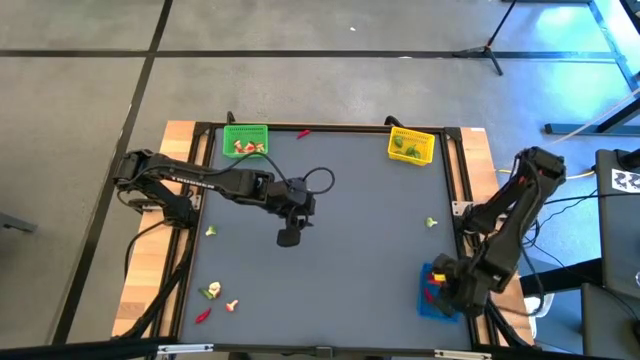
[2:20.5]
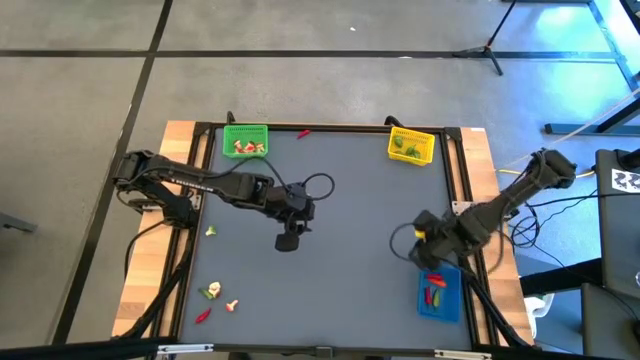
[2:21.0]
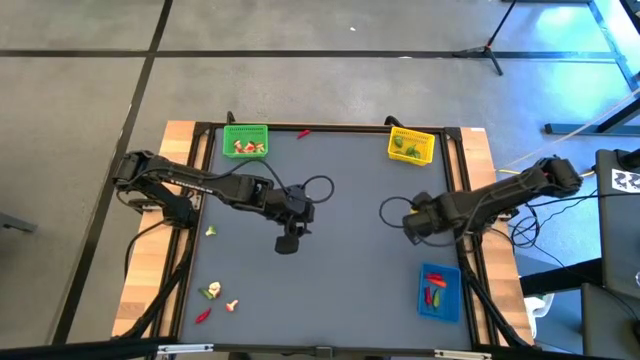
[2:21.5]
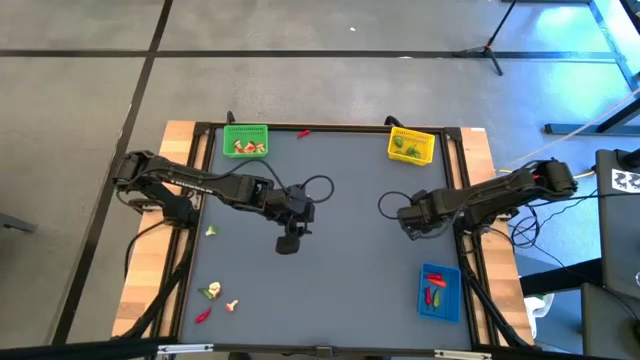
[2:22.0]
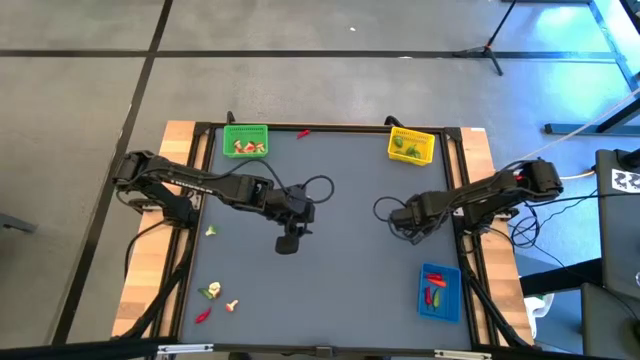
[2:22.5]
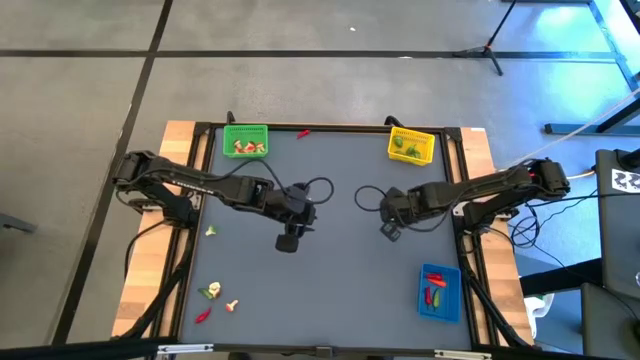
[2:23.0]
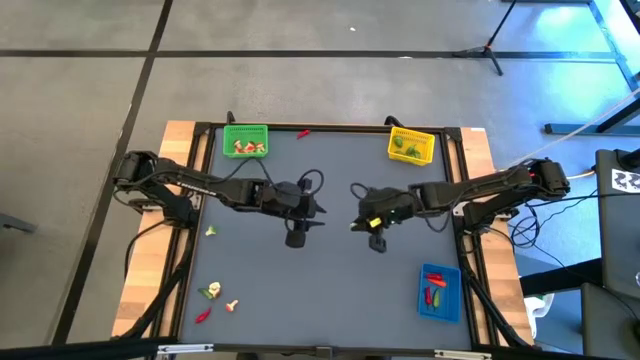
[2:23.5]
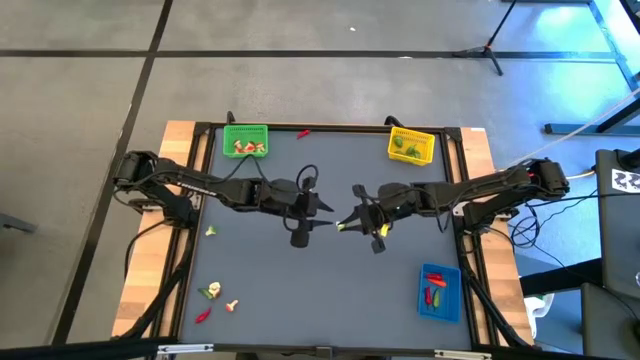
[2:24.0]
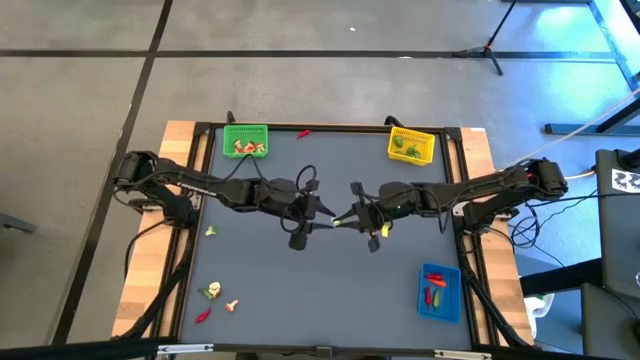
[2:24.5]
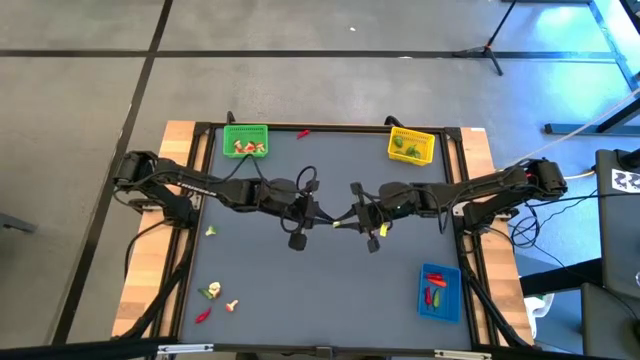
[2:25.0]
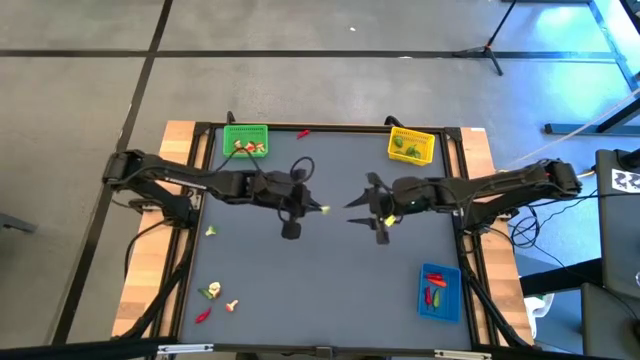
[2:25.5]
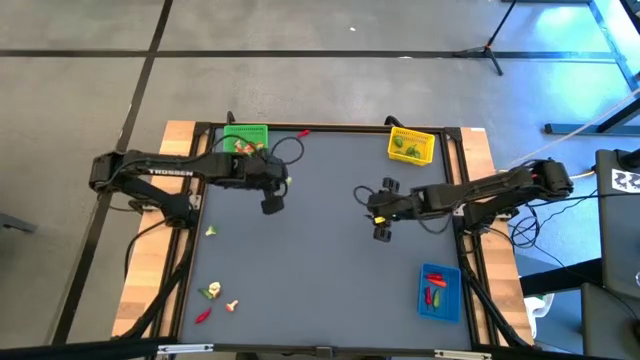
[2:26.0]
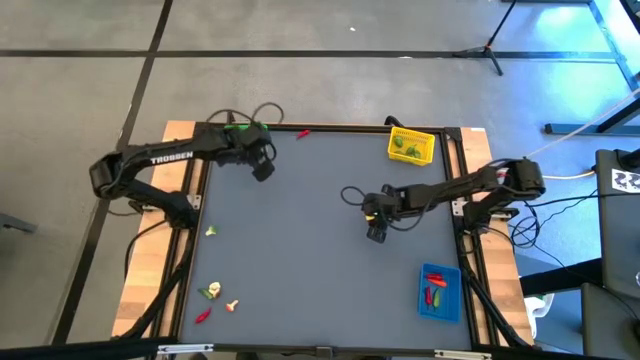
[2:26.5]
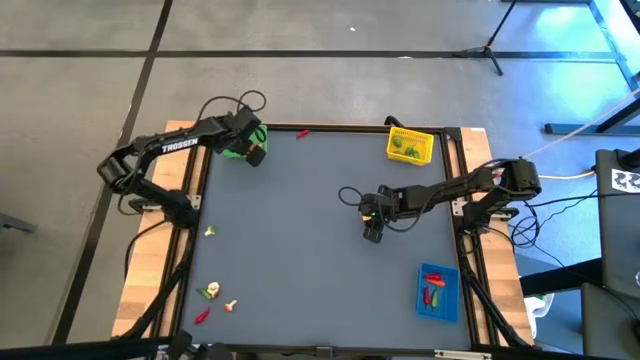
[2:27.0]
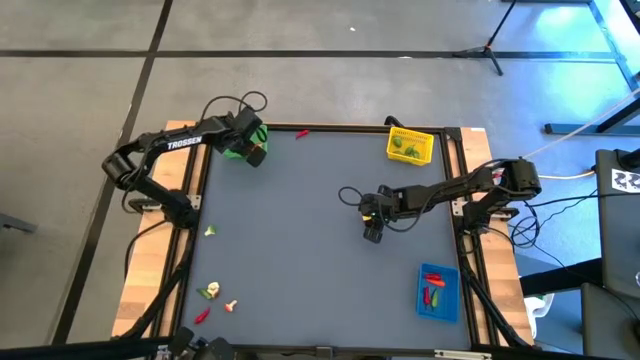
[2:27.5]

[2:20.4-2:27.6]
Task: Sort produce into baskets
Put the green mushroom into the green bin

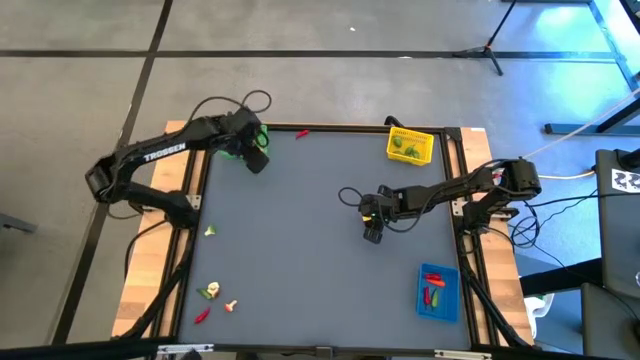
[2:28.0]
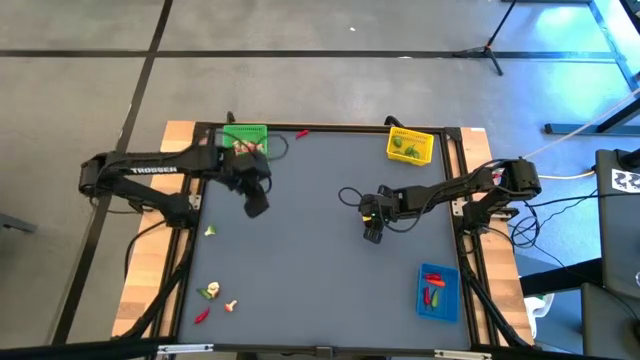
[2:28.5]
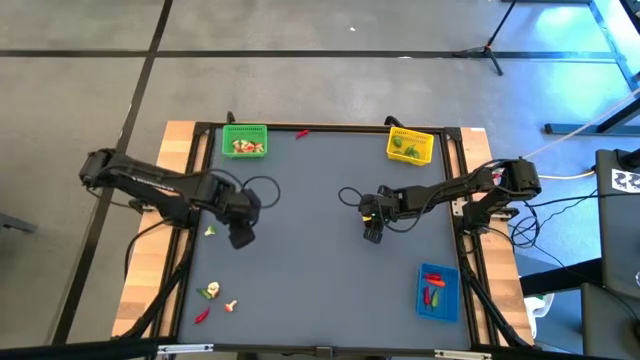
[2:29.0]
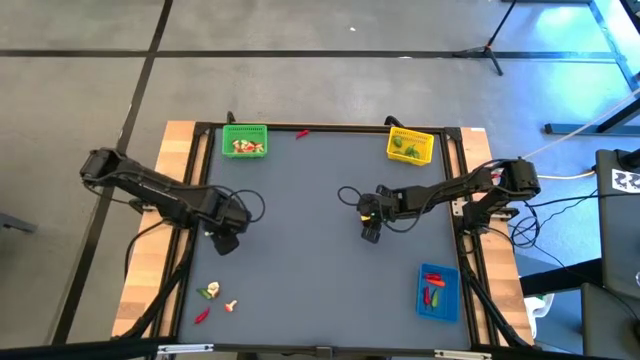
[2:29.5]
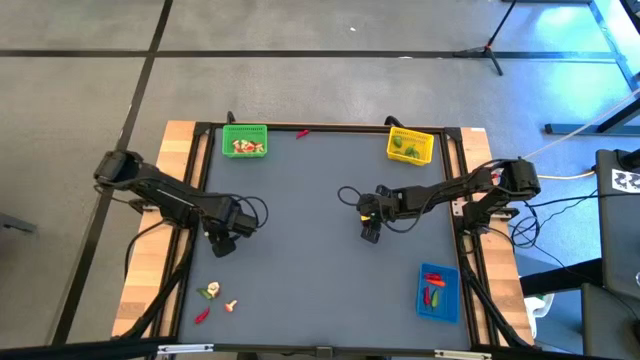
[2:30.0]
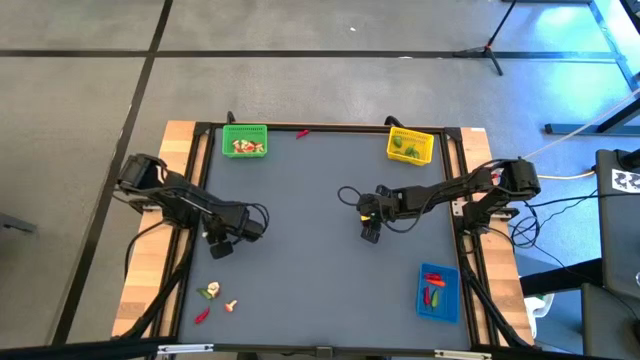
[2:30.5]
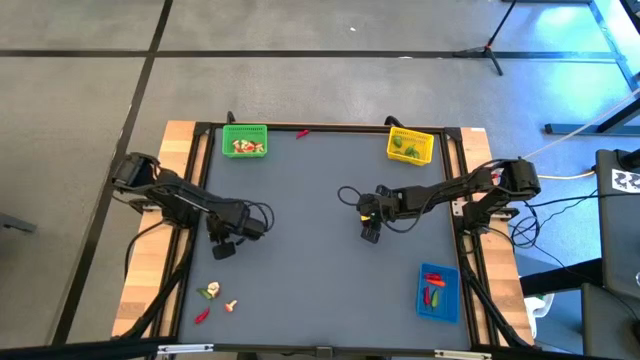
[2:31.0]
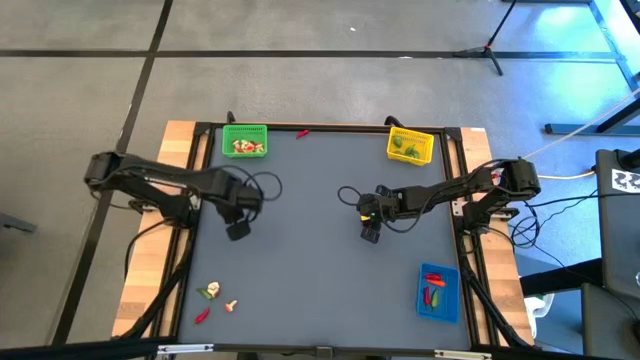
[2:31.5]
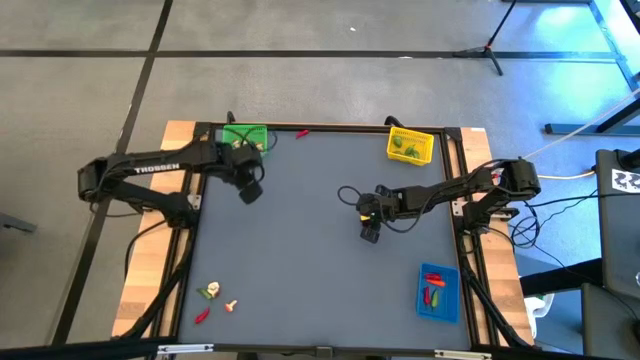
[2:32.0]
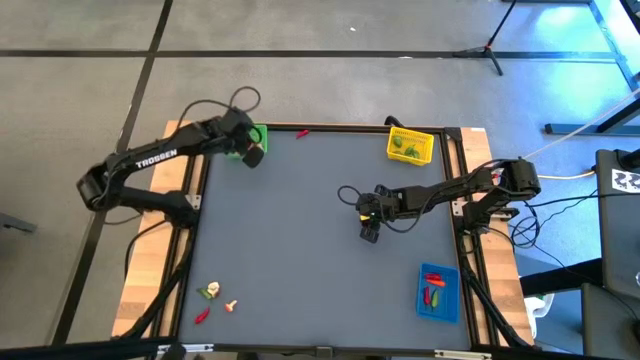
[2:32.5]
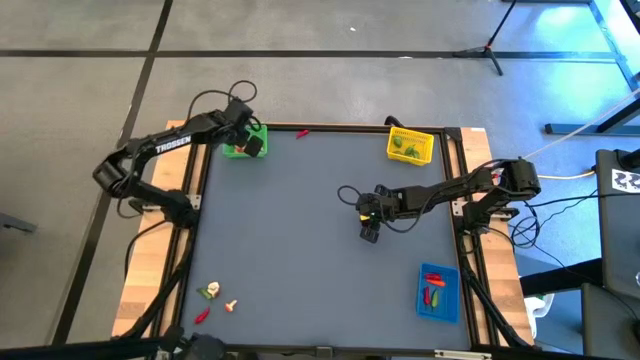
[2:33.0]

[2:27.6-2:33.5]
Put the green mushroom into the green bin

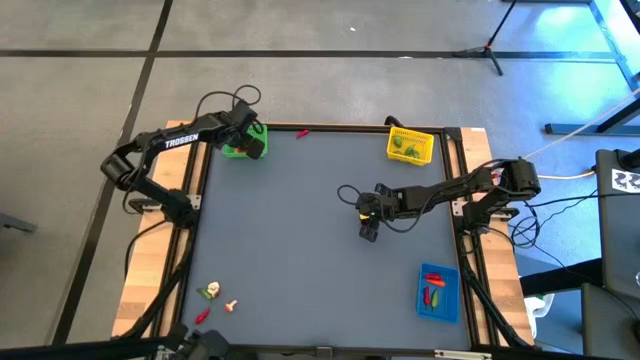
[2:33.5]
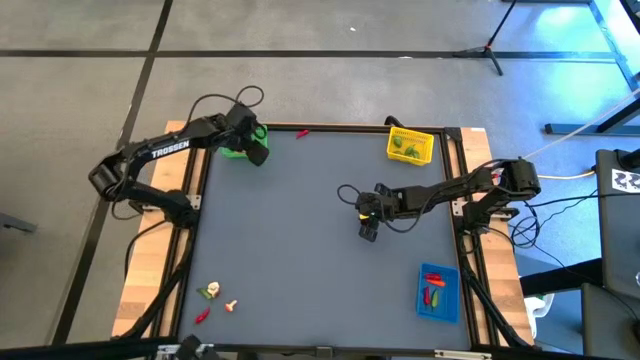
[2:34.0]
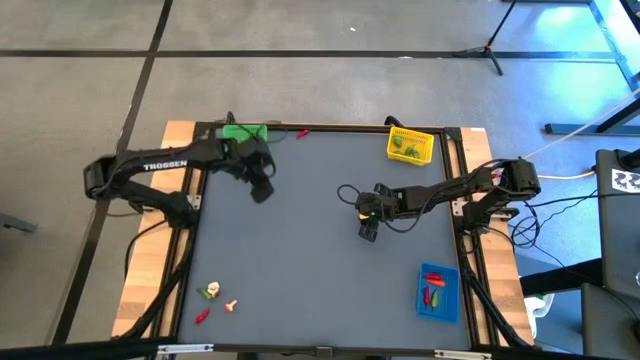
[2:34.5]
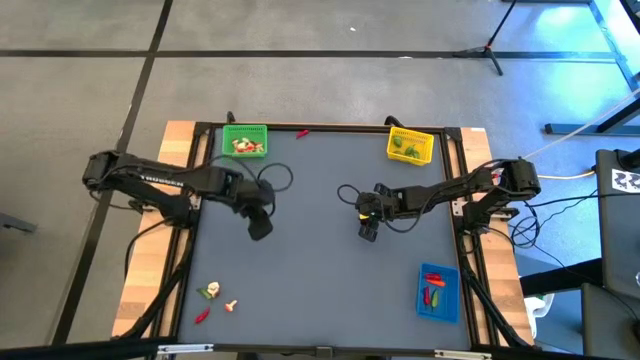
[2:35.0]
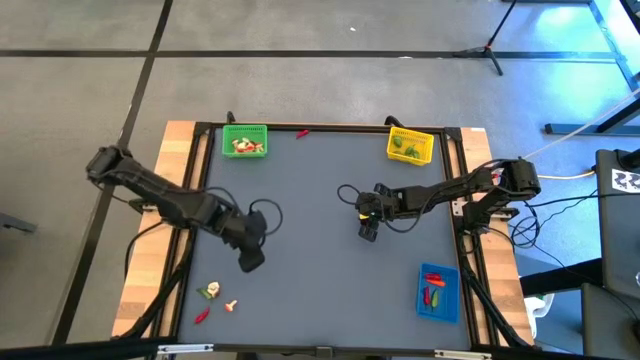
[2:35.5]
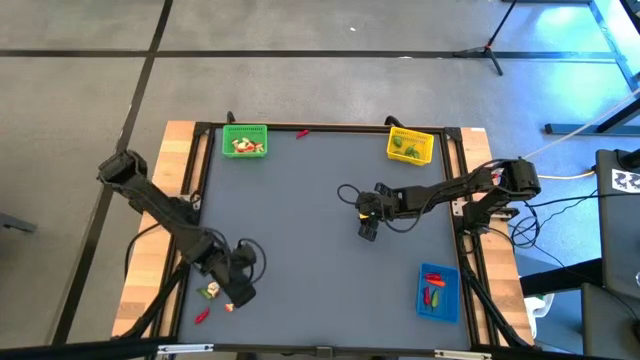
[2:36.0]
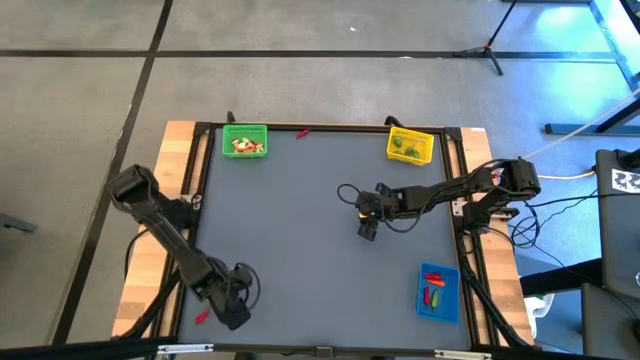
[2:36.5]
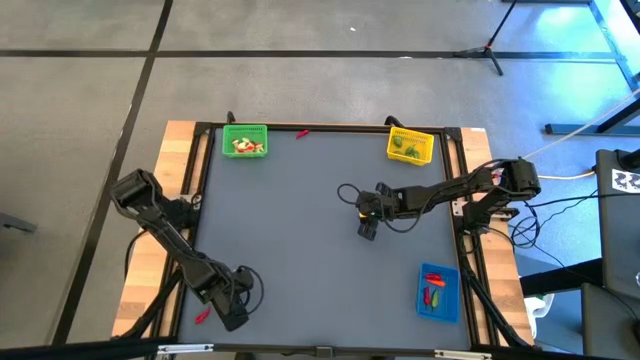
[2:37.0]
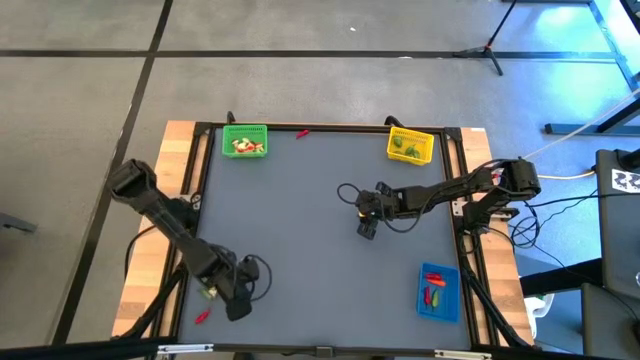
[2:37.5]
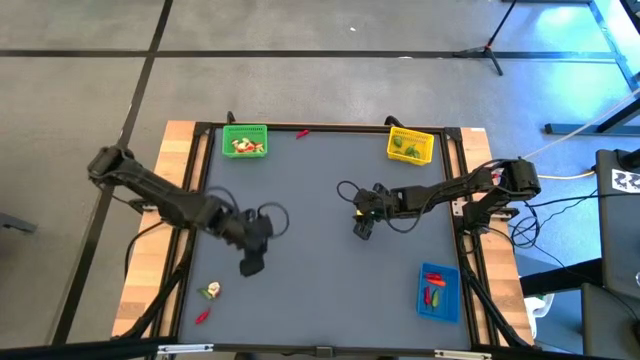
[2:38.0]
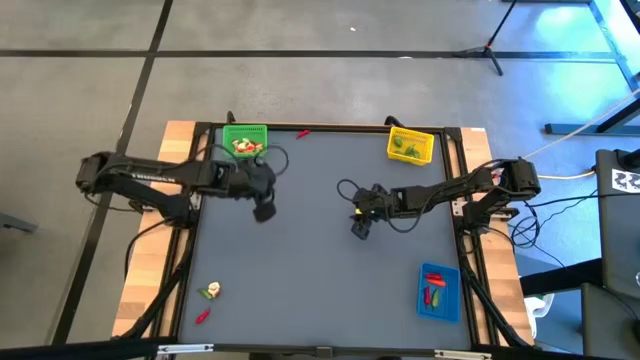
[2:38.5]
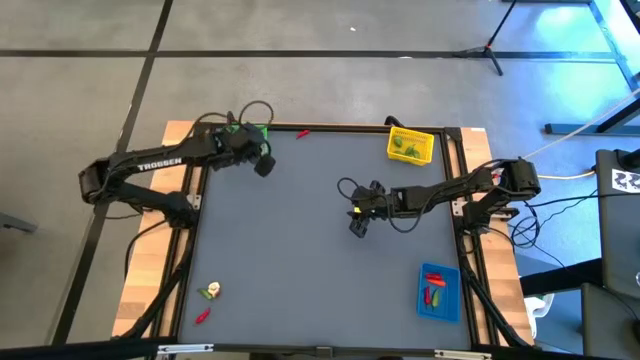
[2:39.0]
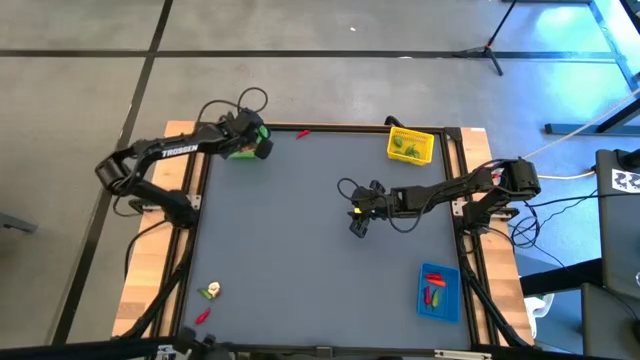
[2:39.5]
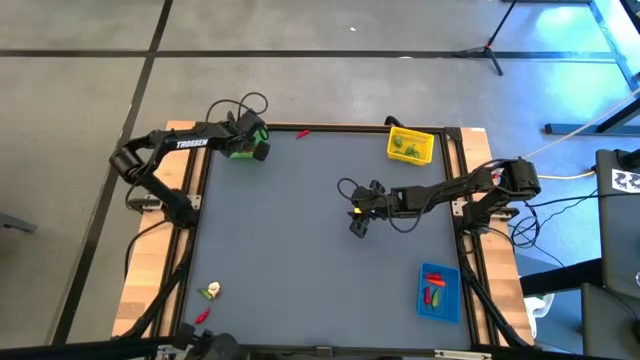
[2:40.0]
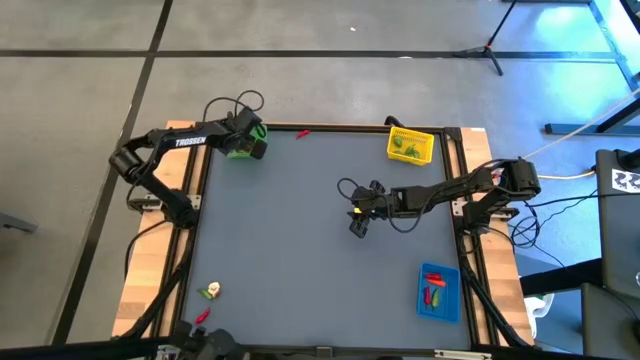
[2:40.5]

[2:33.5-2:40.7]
Put the red mushroom into the green bin
